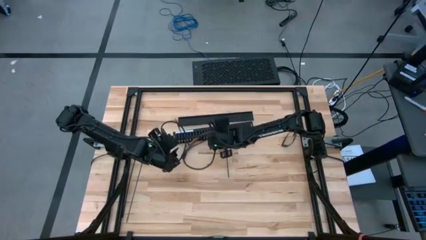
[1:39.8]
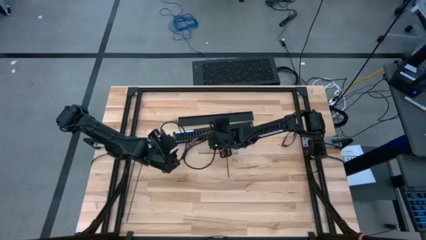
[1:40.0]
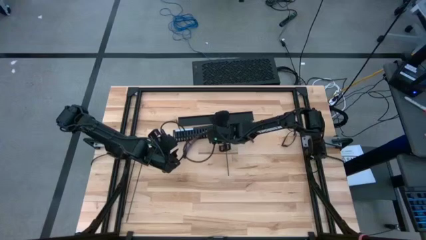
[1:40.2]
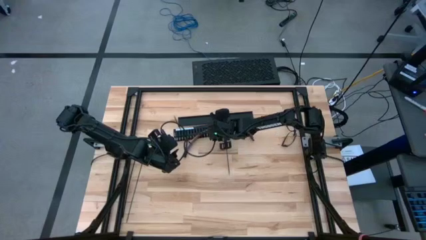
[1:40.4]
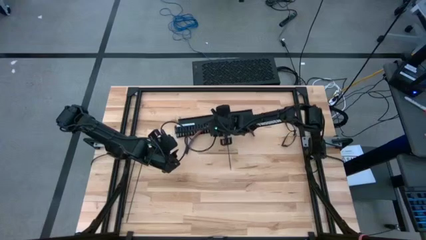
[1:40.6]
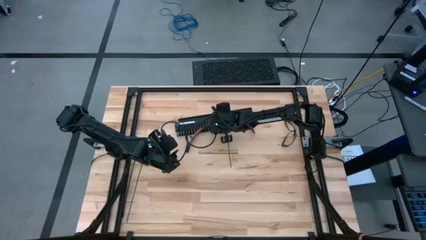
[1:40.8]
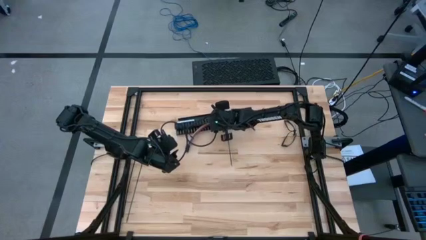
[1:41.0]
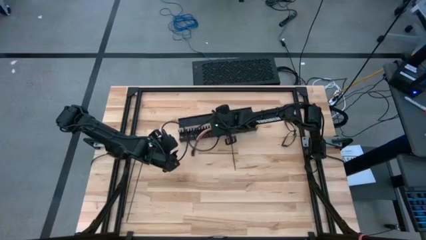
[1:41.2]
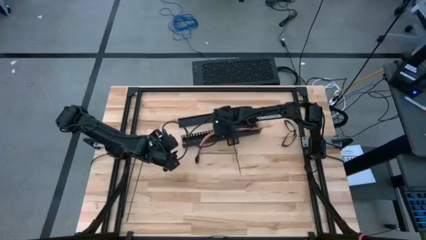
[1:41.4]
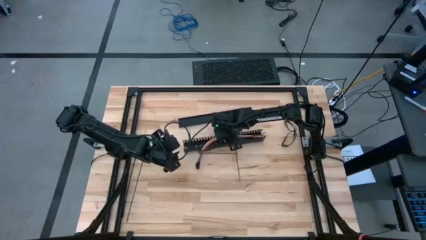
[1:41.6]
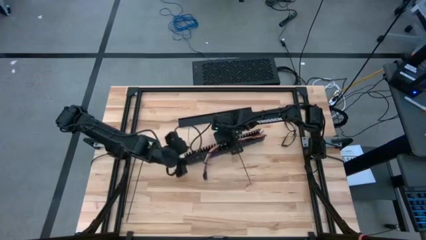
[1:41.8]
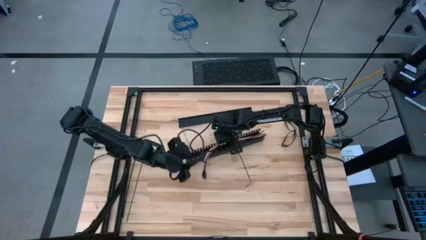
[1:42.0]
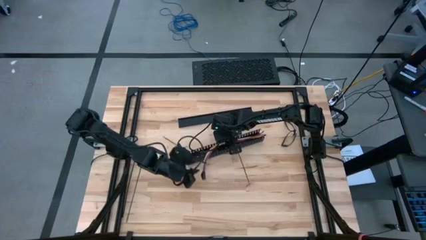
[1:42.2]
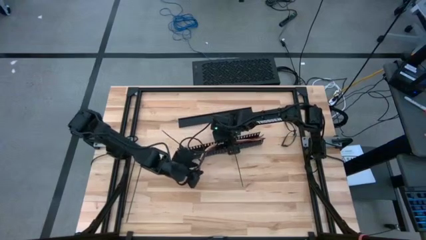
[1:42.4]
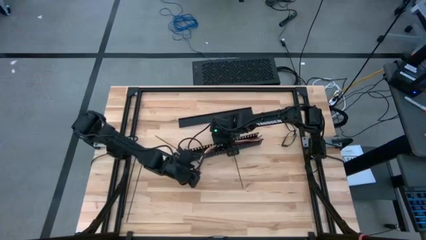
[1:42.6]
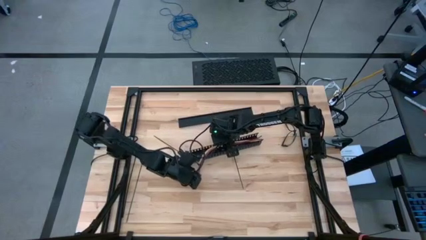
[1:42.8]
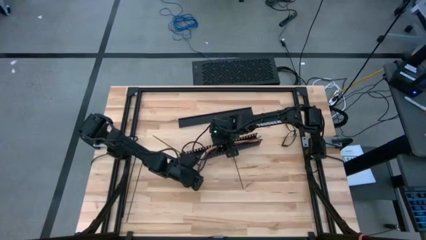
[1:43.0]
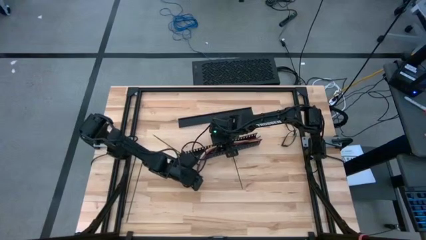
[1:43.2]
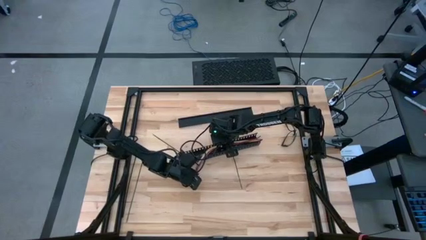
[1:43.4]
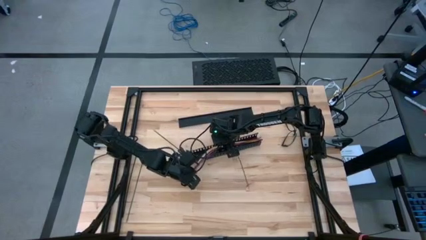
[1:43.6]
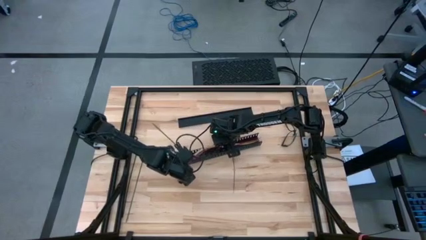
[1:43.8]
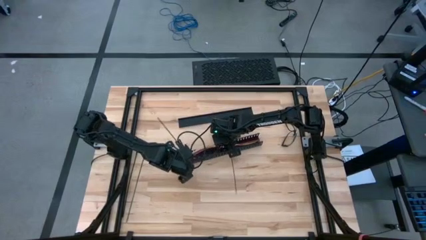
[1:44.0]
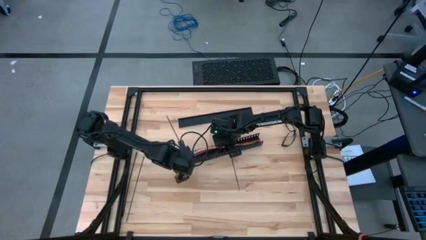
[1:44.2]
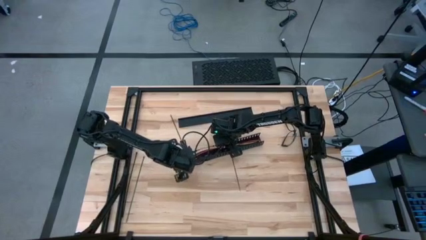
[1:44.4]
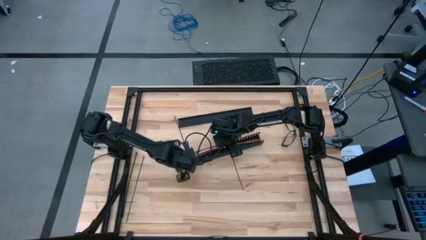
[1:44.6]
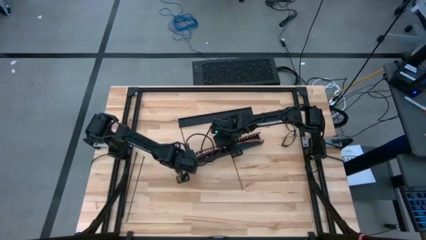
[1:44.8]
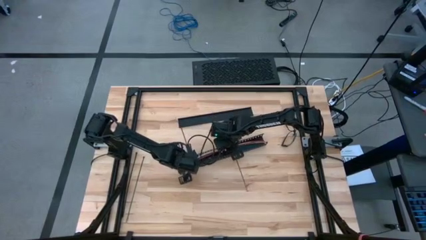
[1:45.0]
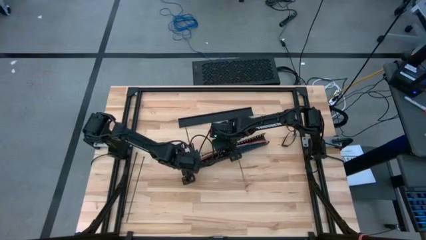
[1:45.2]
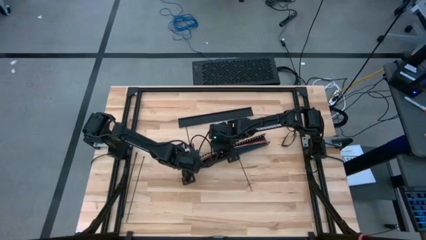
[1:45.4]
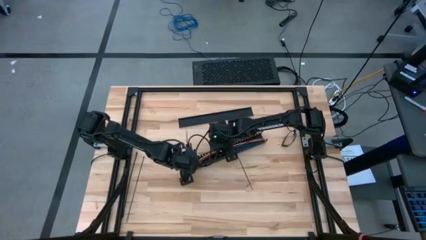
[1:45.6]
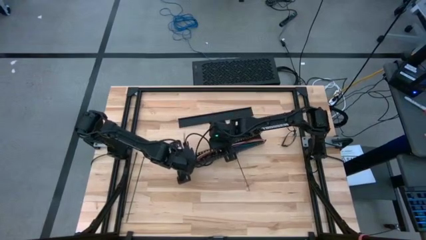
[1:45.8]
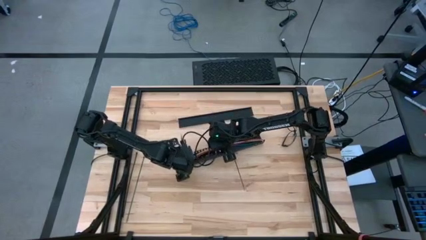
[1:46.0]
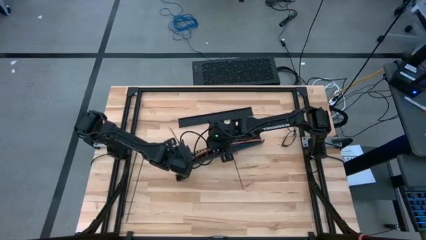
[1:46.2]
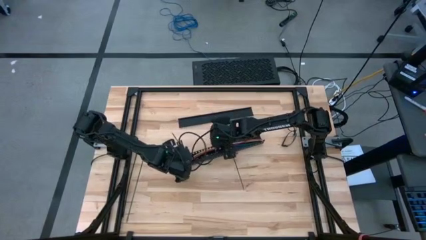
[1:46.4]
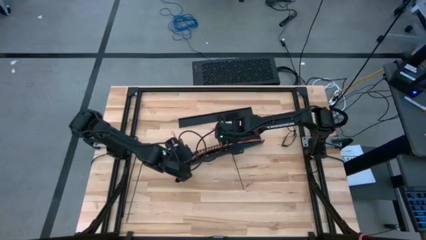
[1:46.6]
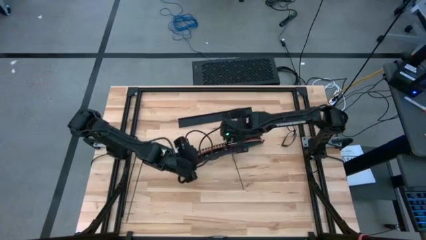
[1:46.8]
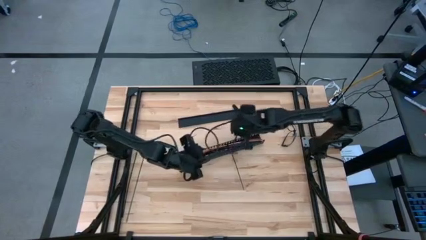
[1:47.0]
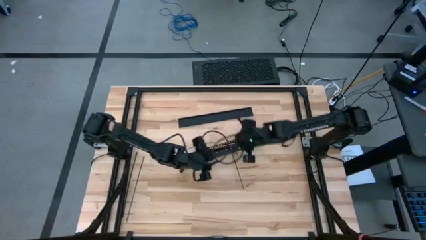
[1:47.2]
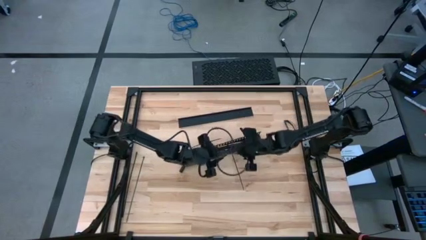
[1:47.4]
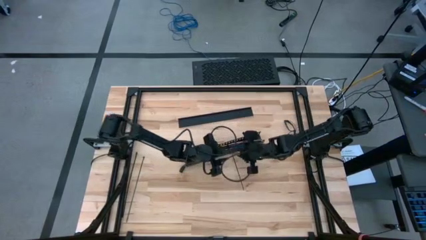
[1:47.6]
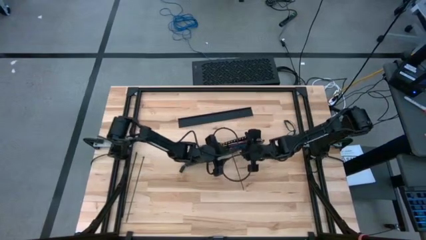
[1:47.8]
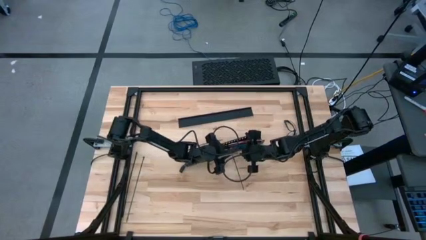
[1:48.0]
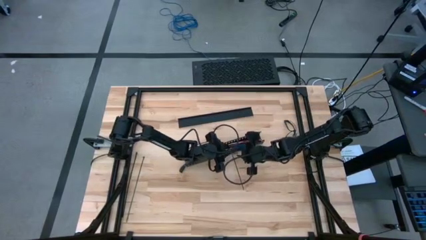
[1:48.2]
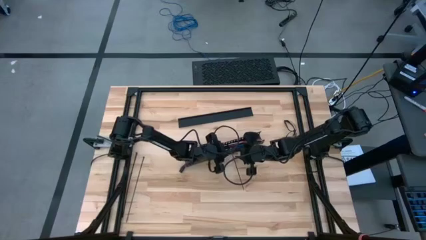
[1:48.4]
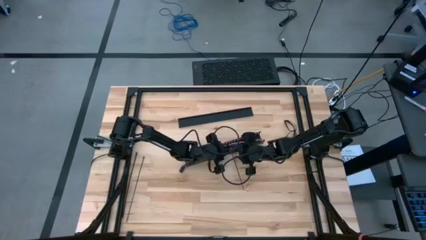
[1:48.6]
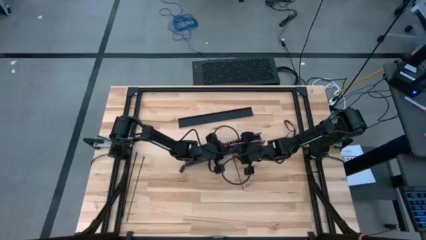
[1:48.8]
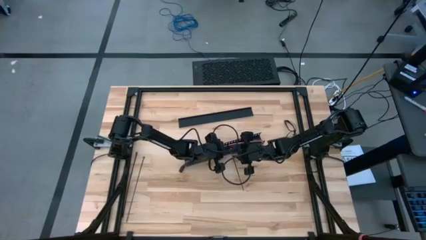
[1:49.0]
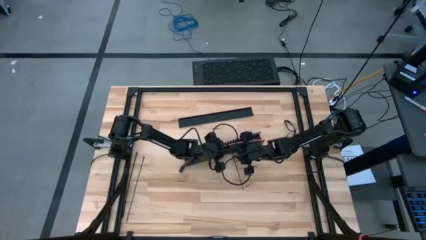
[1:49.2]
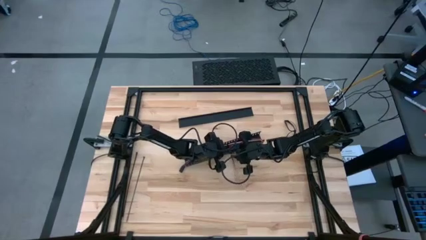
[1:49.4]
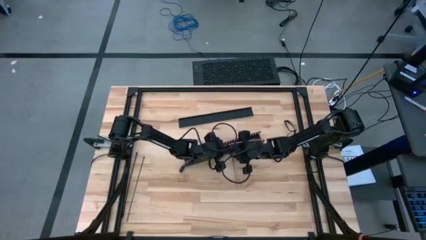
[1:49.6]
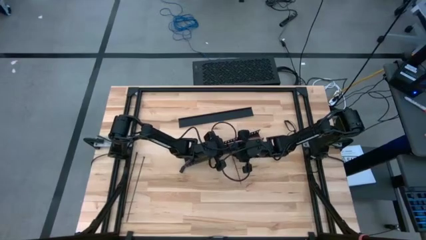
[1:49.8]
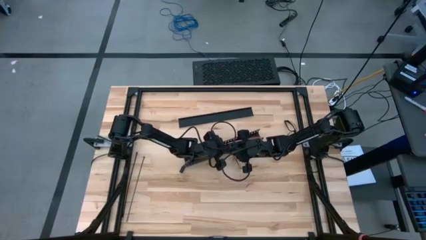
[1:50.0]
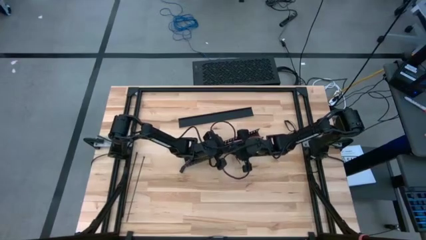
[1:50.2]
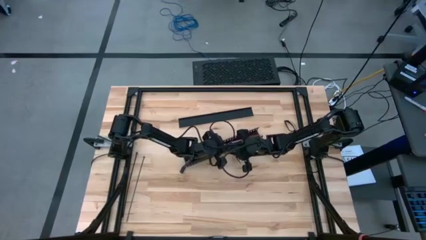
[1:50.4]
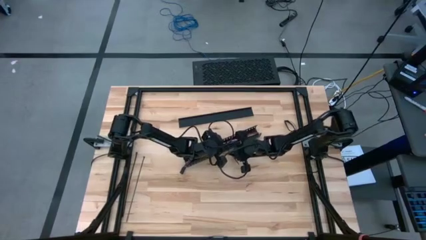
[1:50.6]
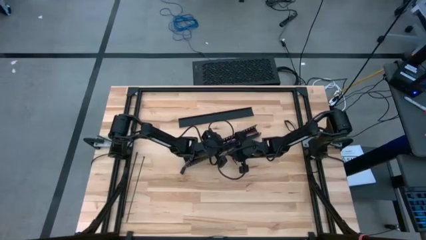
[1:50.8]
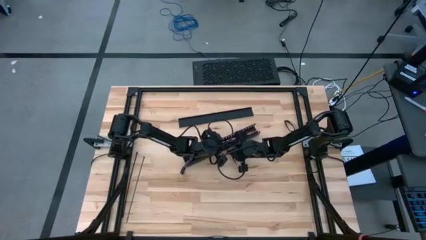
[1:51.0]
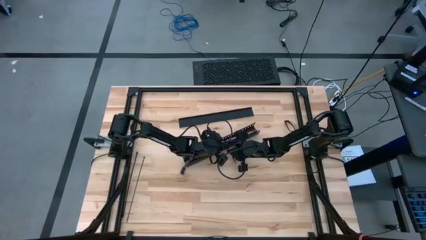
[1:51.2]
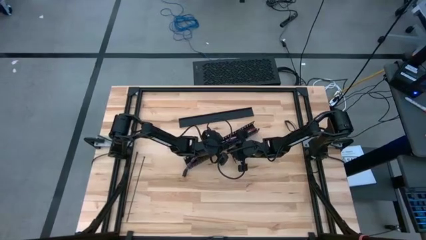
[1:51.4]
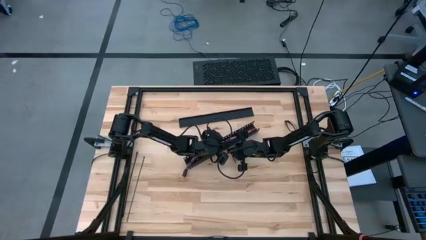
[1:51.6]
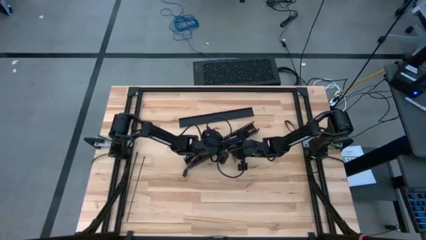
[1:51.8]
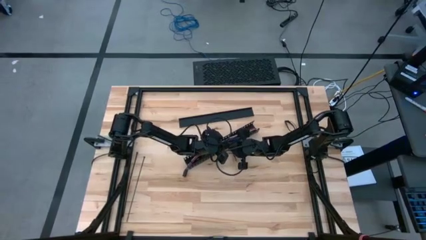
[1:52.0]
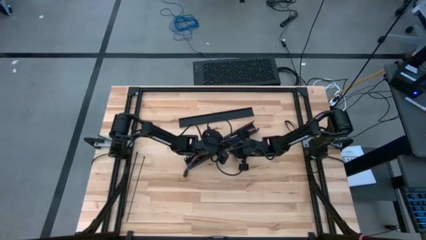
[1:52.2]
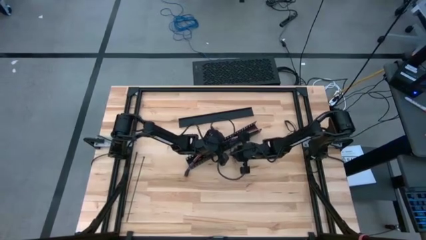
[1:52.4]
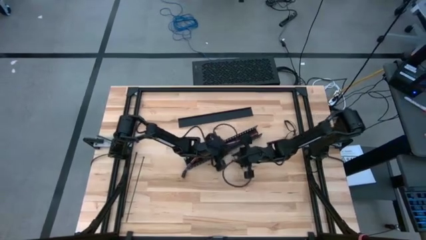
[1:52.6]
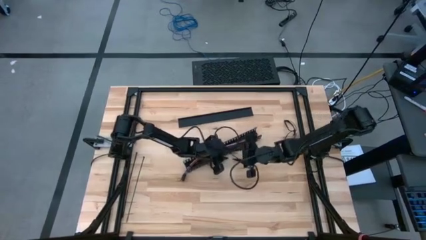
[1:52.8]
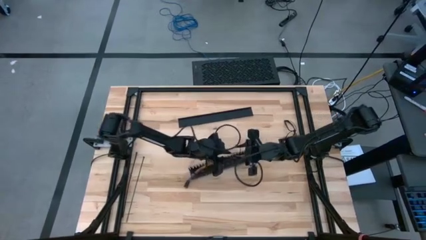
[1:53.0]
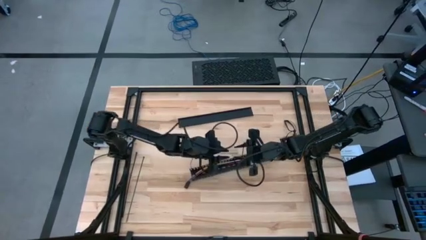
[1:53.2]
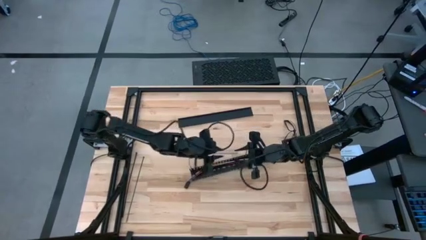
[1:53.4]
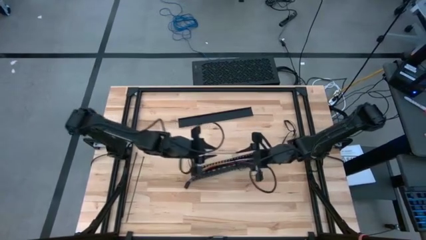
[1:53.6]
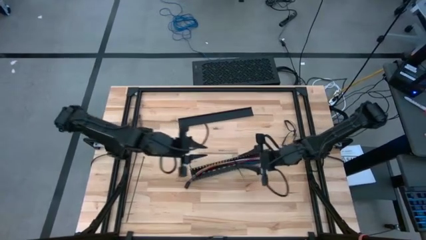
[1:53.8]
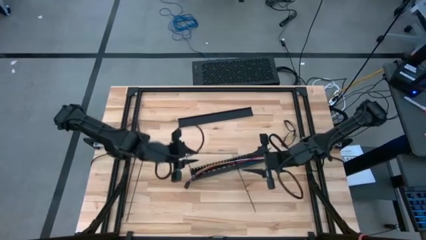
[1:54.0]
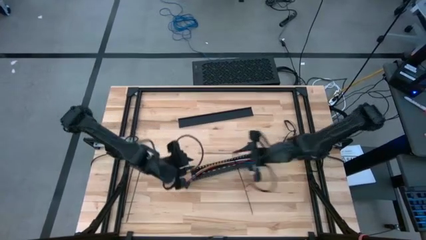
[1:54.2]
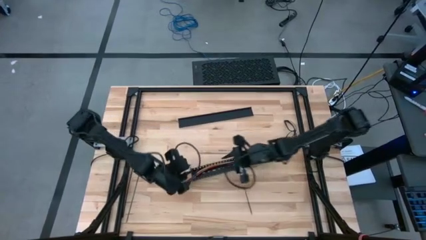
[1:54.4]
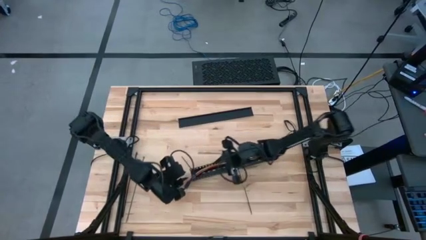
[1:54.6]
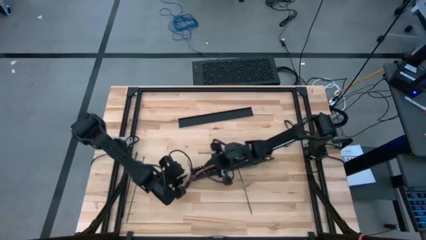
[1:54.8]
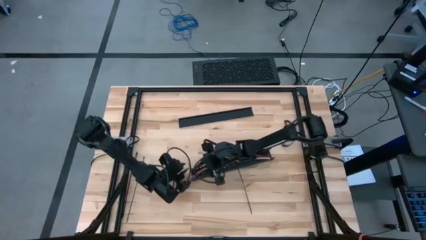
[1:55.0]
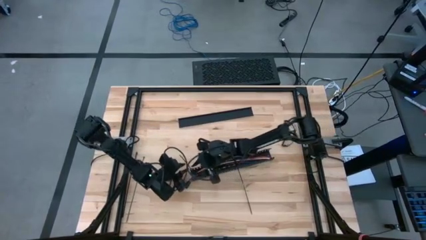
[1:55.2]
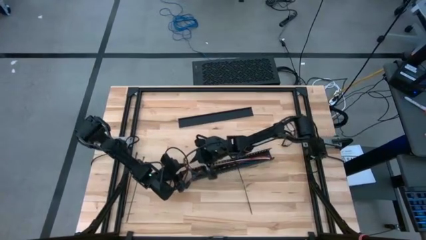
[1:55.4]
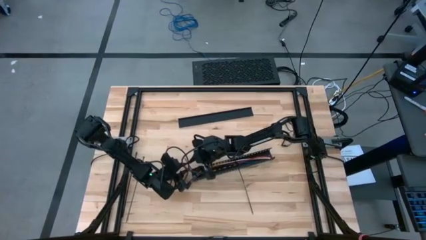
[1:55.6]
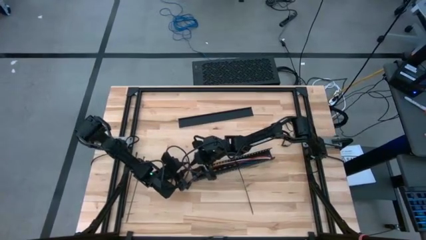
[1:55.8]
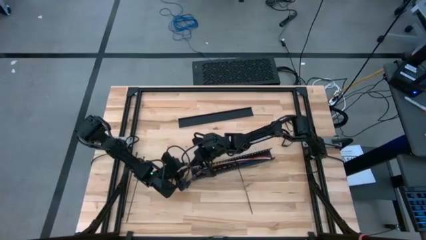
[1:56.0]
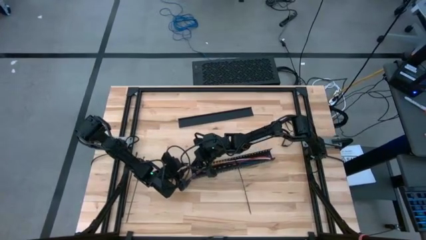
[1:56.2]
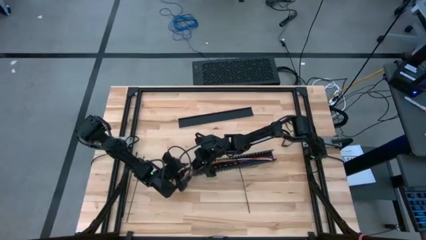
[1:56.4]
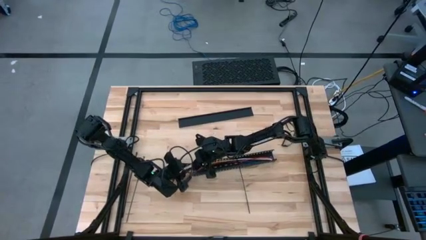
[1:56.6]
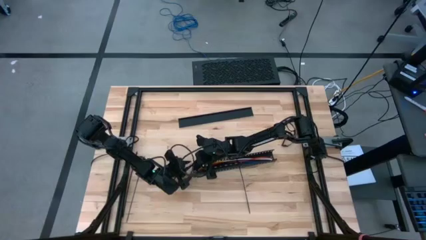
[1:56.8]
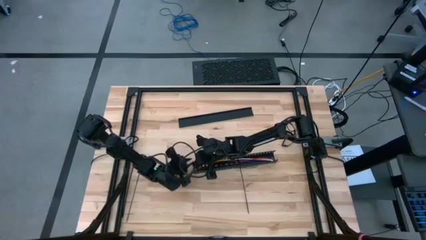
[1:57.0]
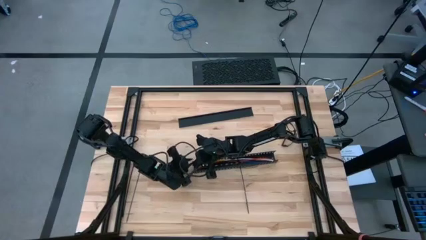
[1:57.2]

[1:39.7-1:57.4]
Task: Ziptie cables
Put the ziptied cables into the black cable duct
